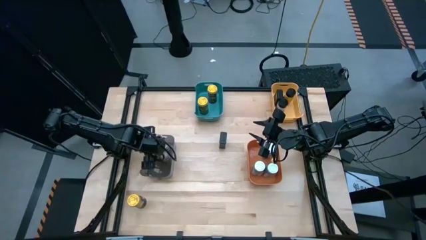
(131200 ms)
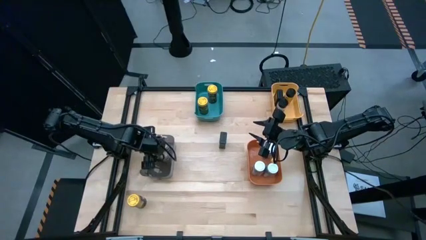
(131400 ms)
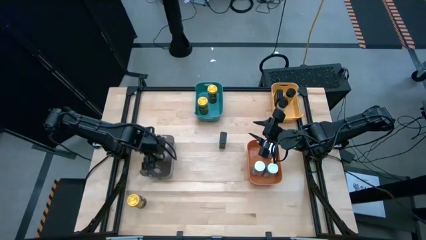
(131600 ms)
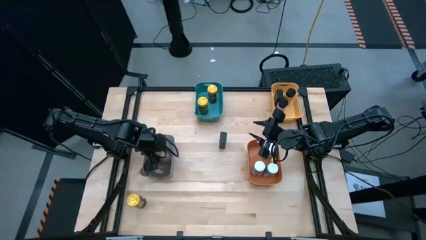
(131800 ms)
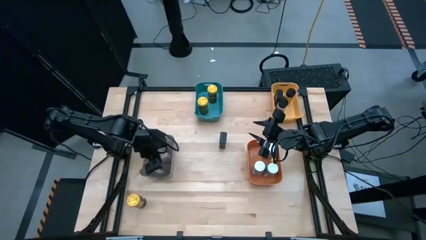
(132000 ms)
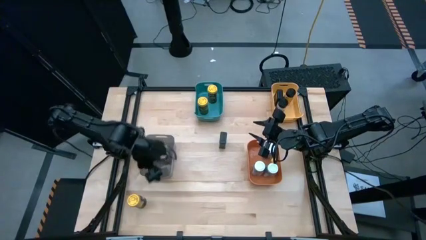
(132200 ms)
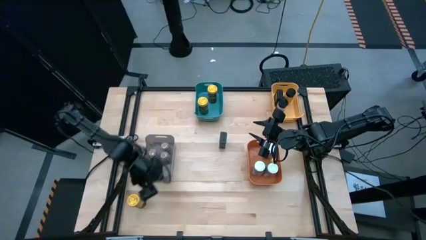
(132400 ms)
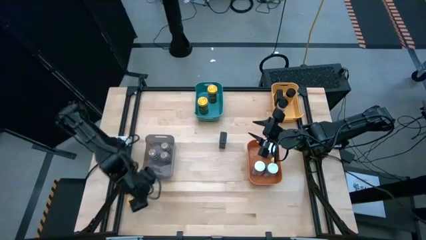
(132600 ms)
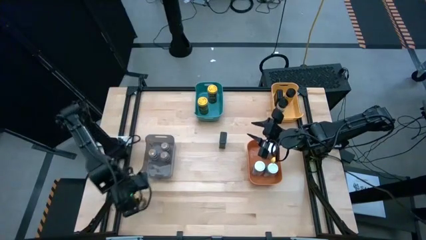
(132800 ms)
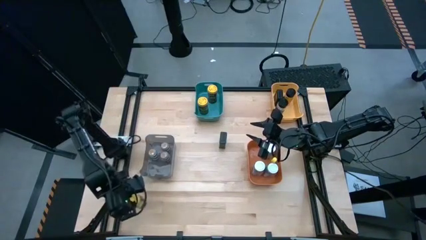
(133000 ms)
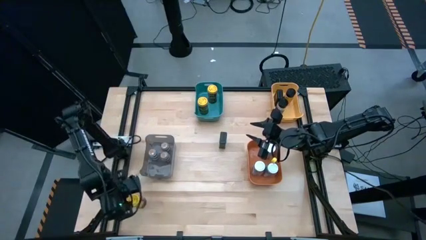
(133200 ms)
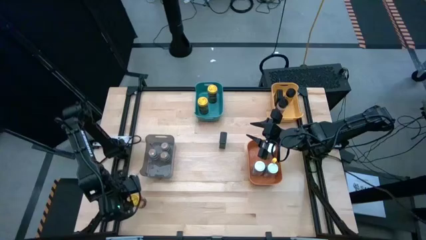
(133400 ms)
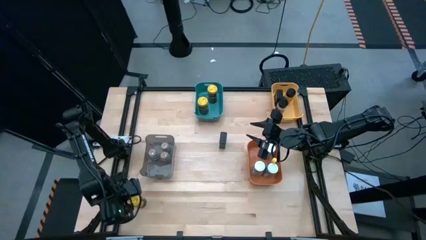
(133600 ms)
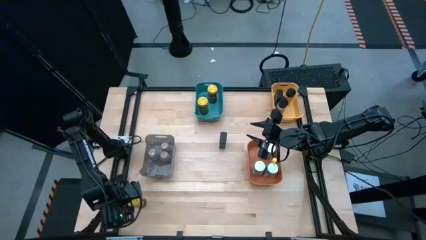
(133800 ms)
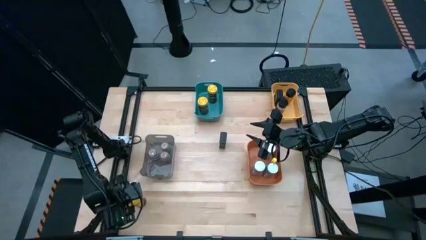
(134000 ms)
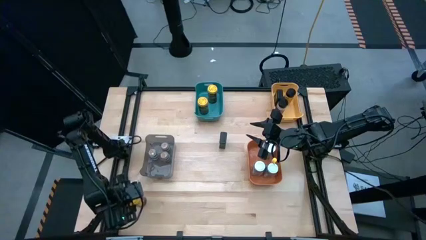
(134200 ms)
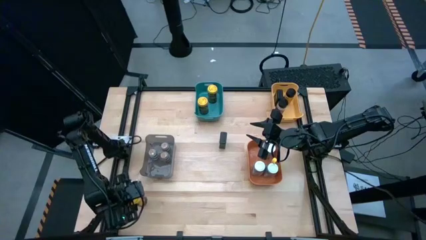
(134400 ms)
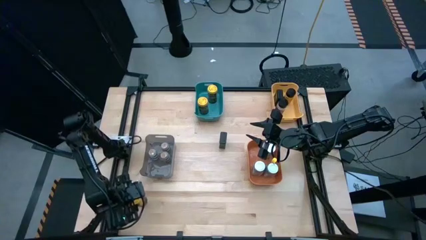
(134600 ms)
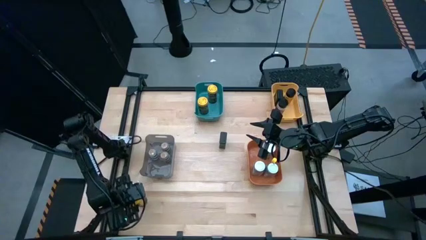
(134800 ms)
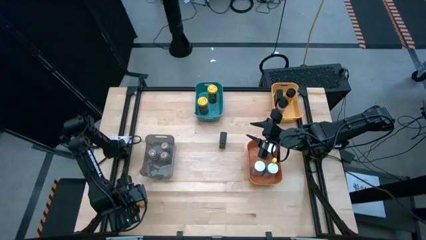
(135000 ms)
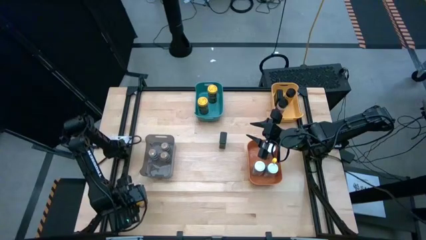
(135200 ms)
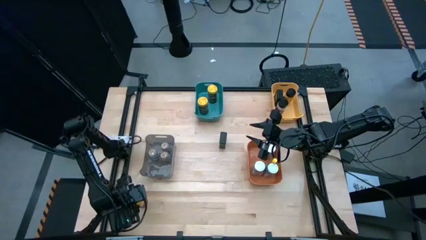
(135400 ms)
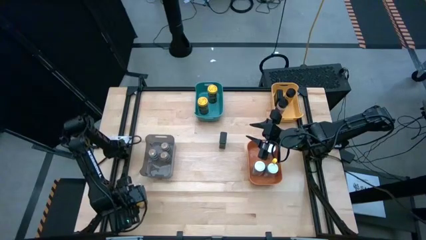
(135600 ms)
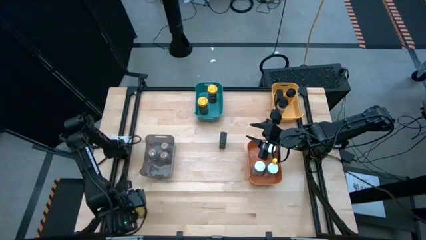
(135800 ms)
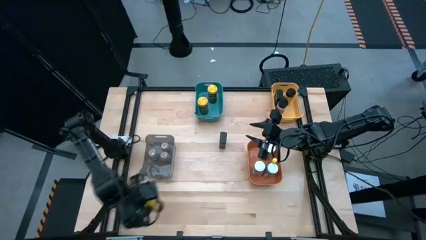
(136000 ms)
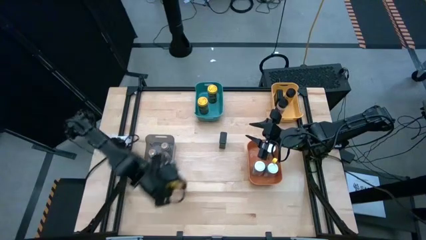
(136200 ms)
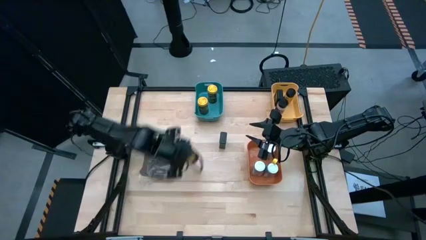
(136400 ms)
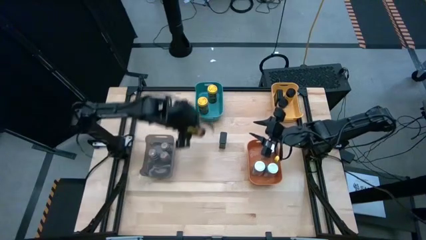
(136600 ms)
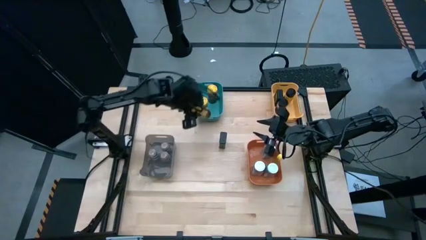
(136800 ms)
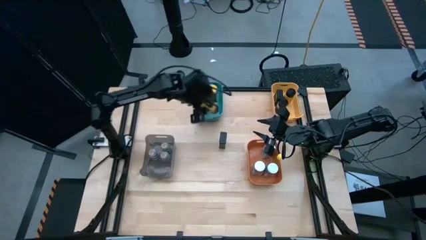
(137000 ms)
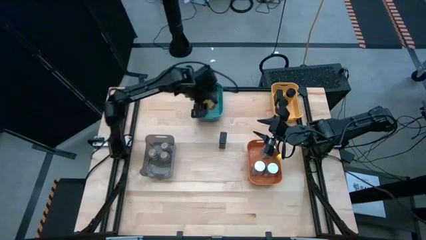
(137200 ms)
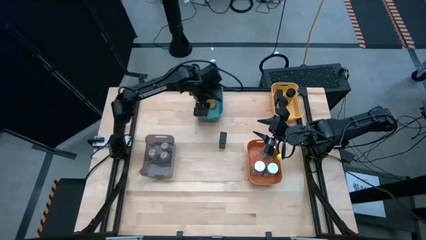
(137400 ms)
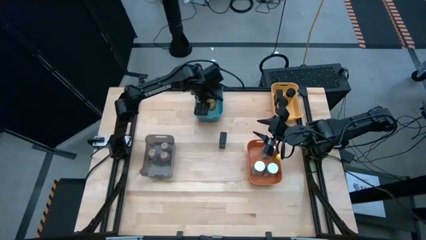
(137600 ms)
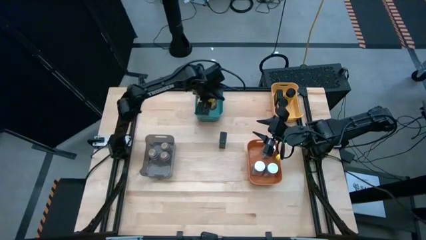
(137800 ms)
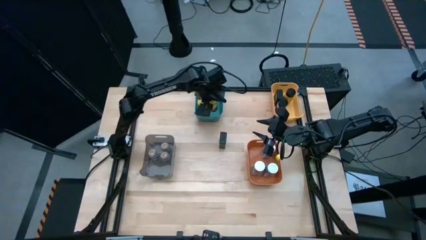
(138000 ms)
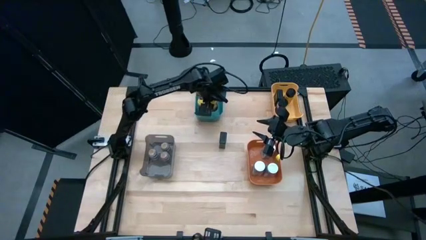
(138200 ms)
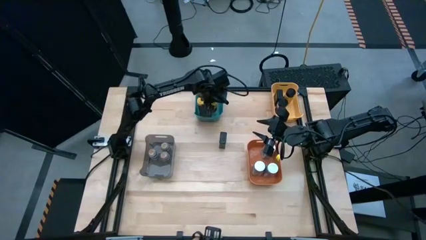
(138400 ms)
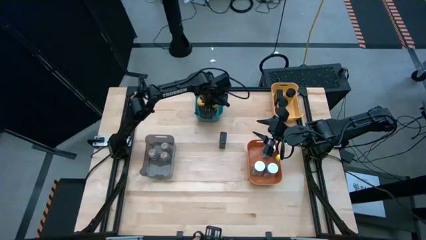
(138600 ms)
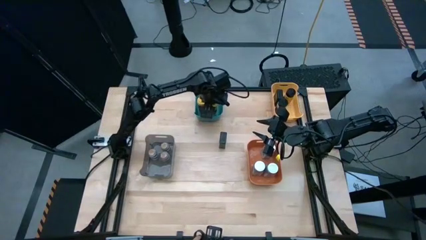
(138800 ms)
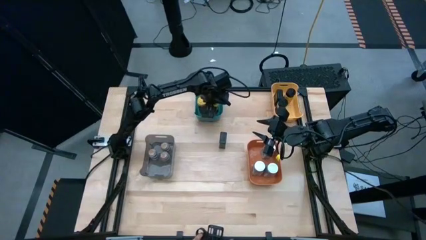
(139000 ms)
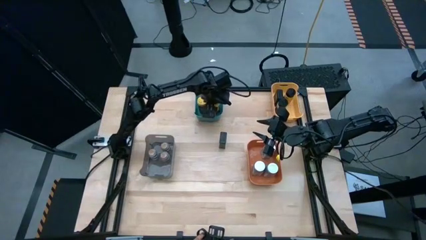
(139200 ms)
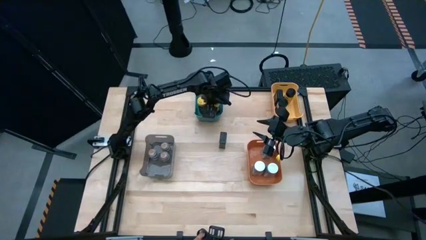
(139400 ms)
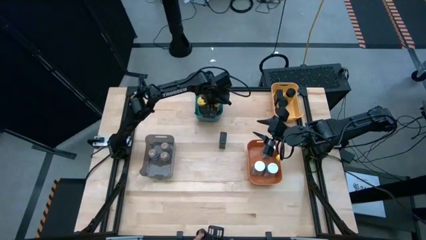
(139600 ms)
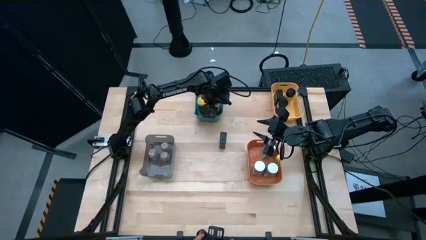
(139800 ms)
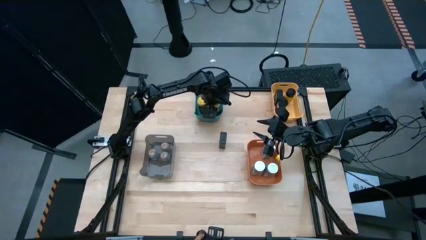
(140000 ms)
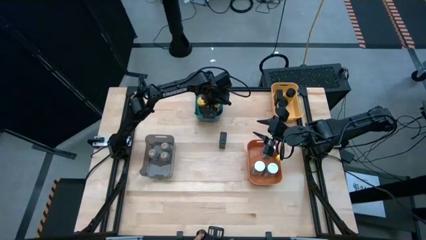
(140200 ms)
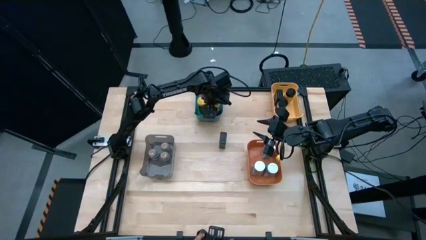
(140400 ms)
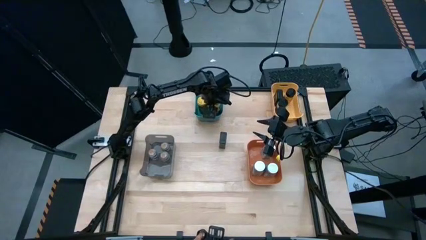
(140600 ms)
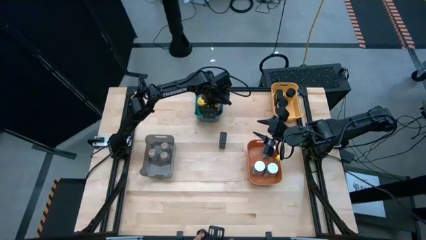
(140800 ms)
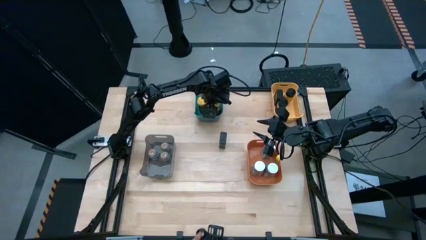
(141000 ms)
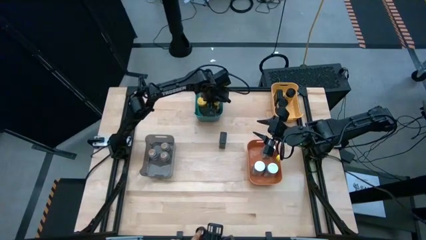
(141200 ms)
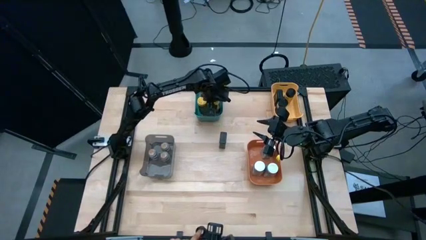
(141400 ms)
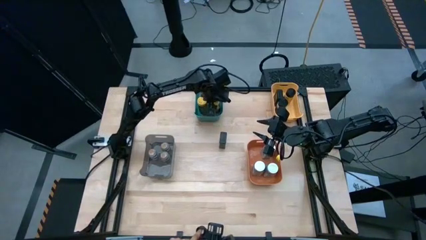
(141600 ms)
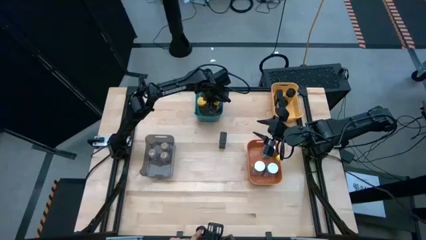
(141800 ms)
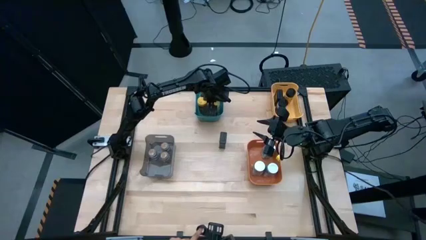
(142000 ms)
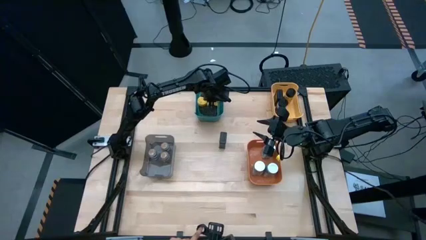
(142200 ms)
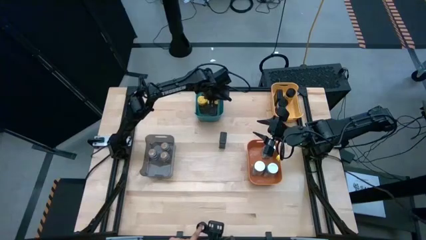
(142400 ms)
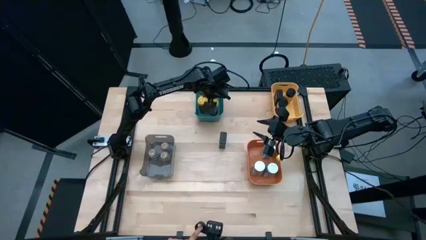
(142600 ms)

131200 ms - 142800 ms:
Task: Sort spices by type
Put the yellow seasoning bottle into the blue bin

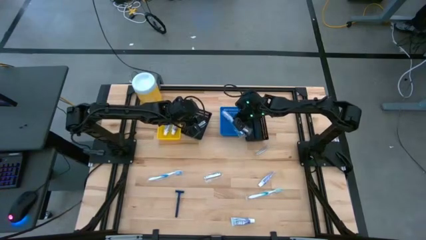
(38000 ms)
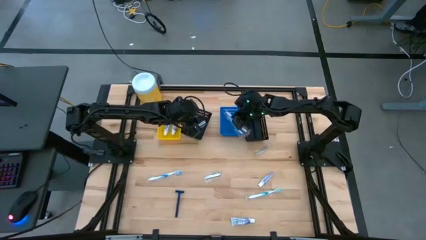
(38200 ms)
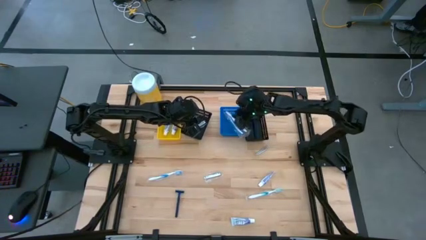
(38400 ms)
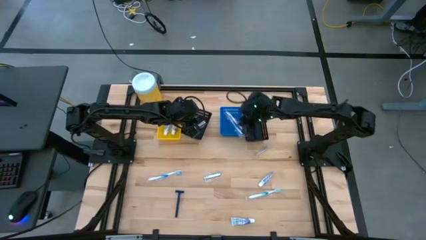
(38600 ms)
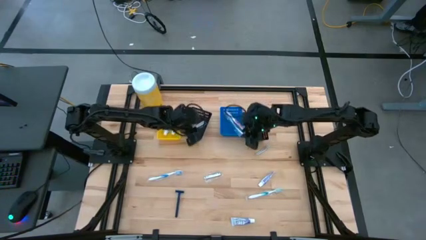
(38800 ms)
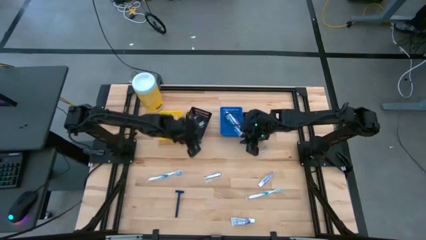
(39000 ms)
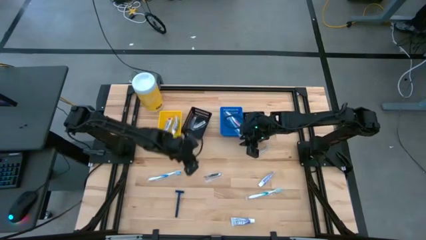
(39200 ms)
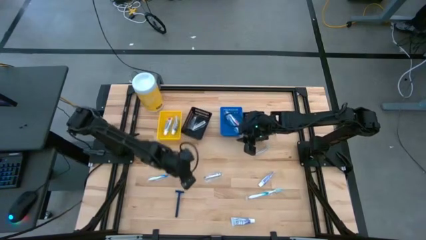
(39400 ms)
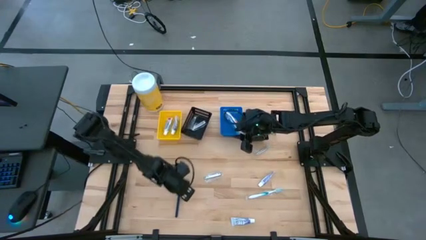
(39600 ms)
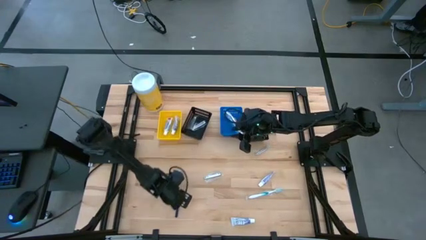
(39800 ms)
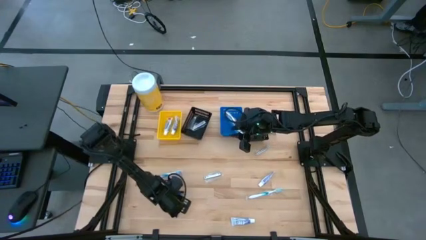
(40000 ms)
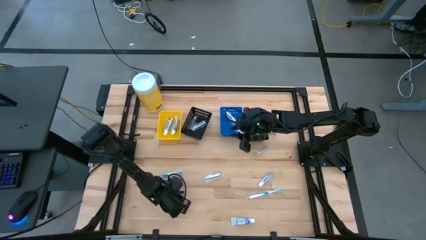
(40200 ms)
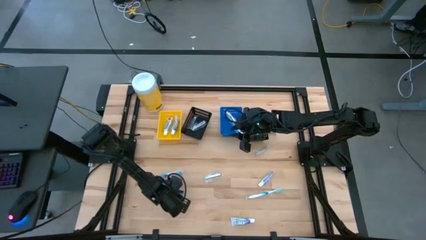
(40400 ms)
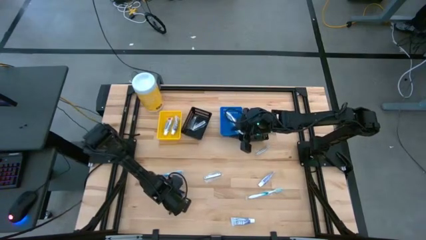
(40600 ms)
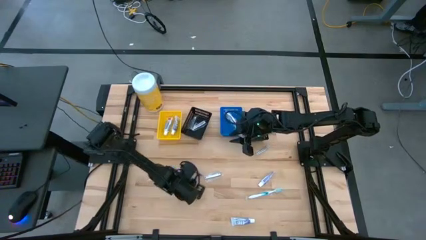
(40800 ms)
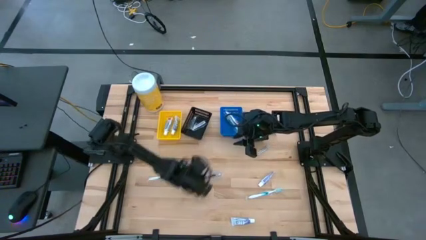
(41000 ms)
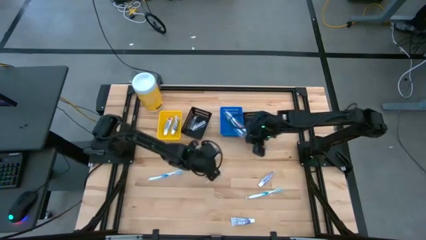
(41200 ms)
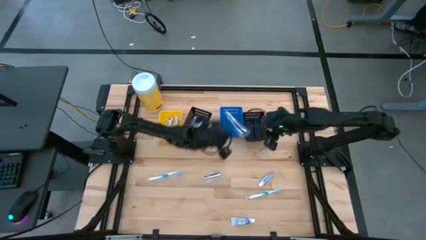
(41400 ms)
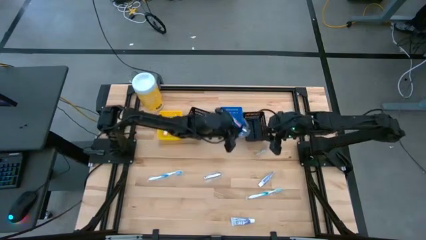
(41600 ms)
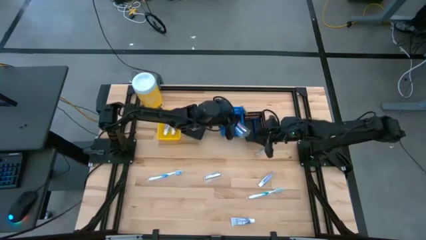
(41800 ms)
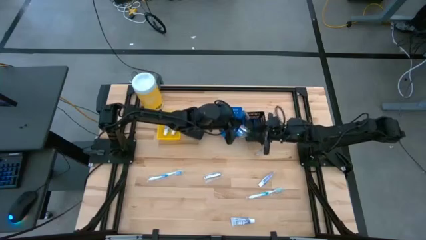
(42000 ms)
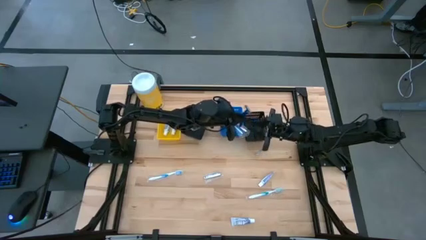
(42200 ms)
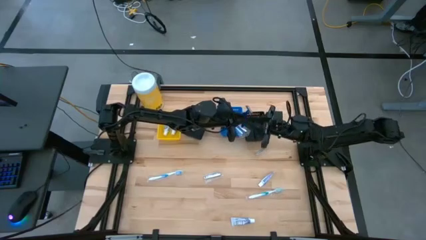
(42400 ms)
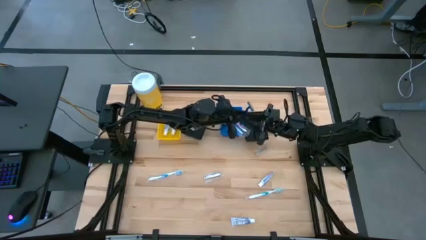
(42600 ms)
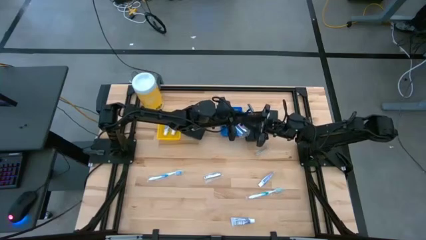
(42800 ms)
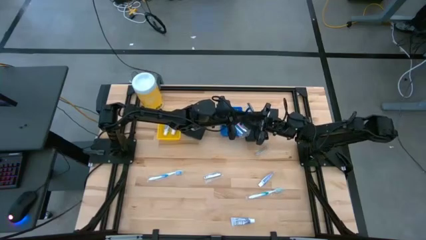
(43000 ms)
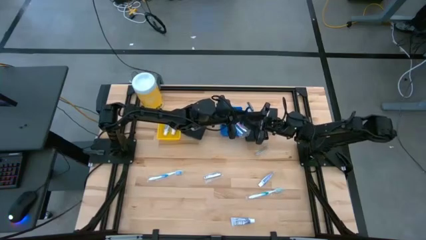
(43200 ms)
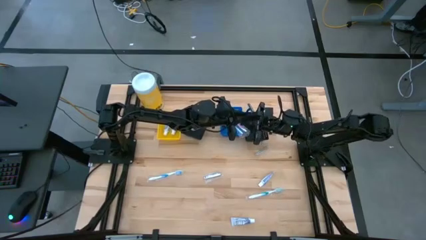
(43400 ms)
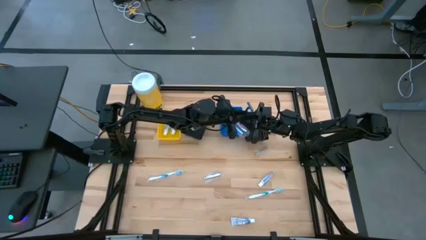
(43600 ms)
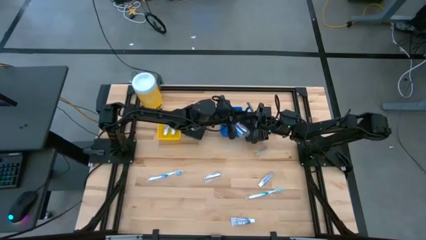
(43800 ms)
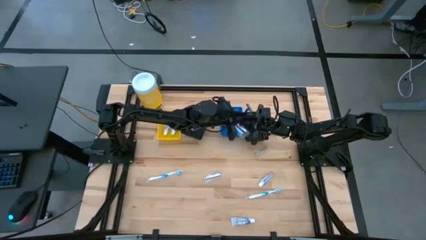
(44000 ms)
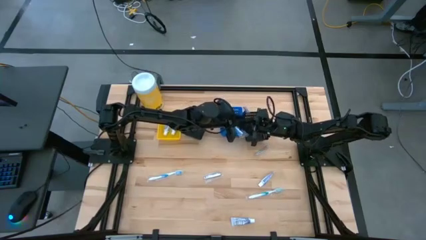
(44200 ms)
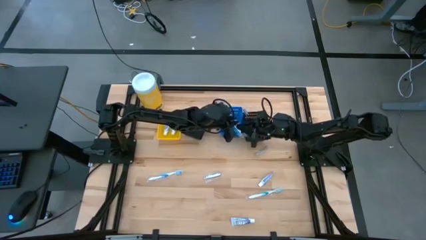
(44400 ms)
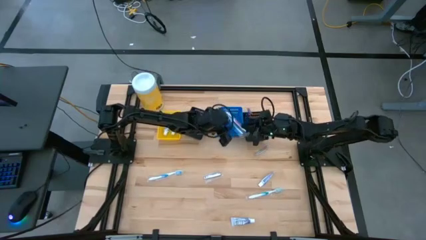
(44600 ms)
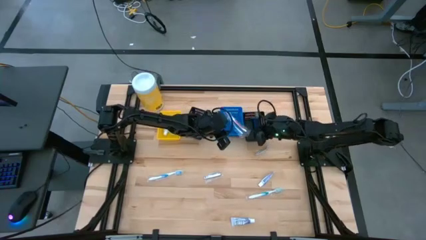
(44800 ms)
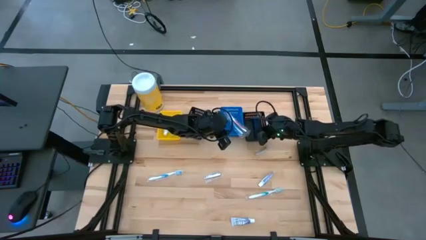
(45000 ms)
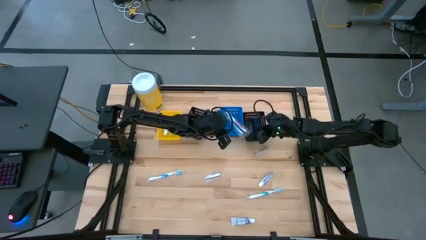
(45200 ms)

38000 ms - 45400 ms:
Task: Pick & Place Travel size toiletries
Put the blue razor into the left black bin
